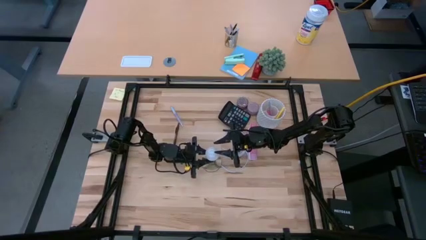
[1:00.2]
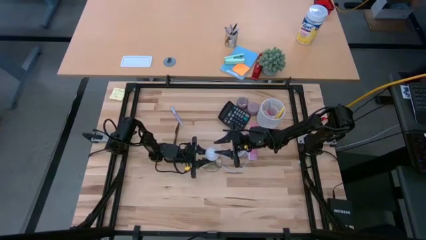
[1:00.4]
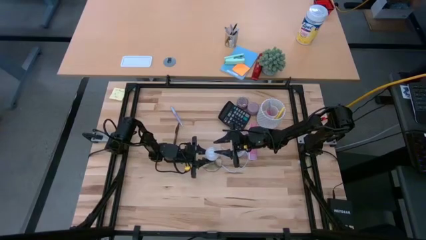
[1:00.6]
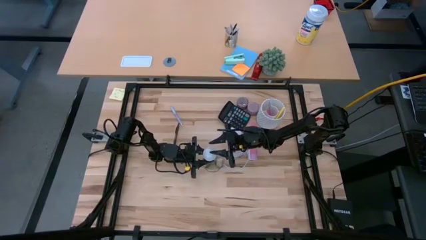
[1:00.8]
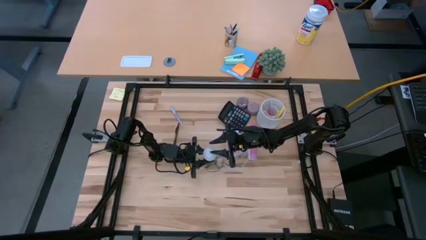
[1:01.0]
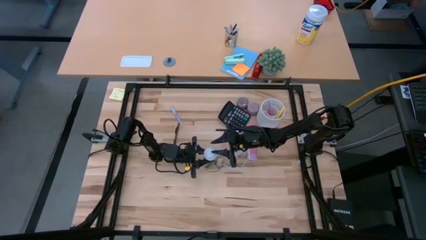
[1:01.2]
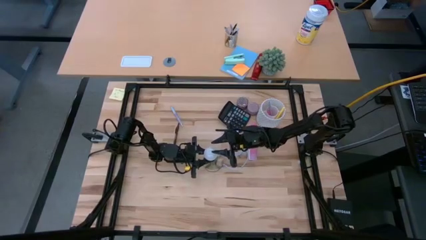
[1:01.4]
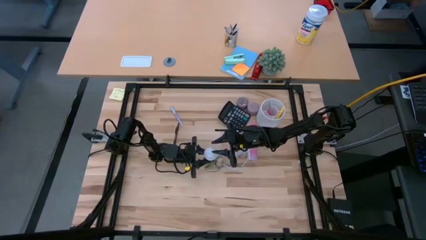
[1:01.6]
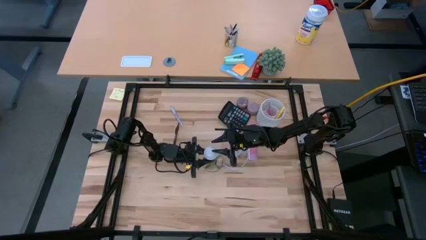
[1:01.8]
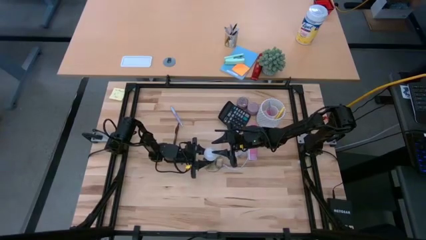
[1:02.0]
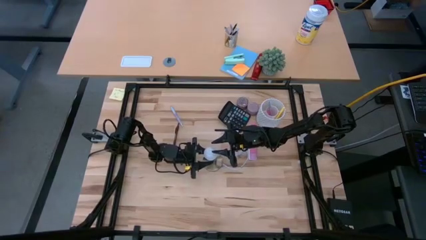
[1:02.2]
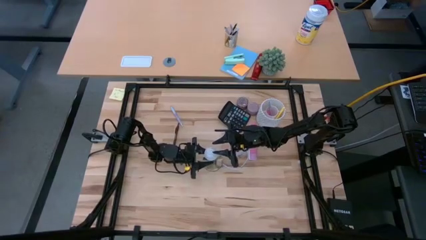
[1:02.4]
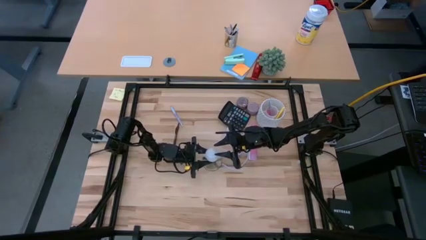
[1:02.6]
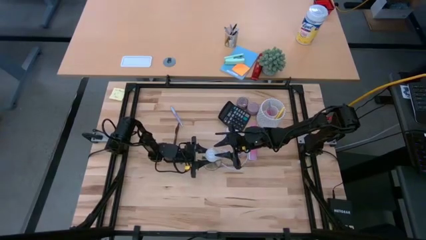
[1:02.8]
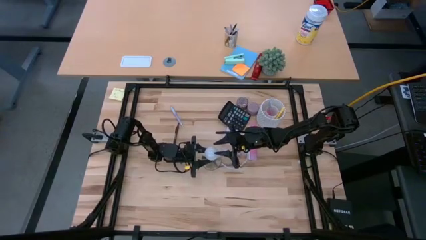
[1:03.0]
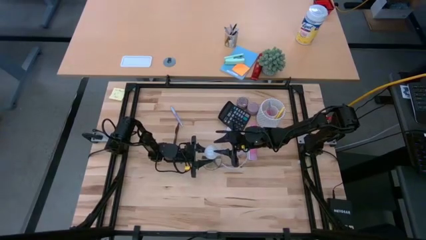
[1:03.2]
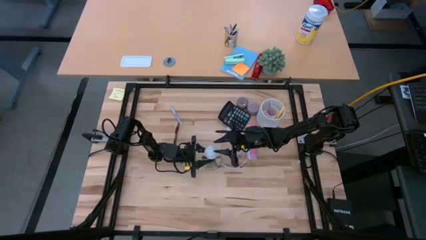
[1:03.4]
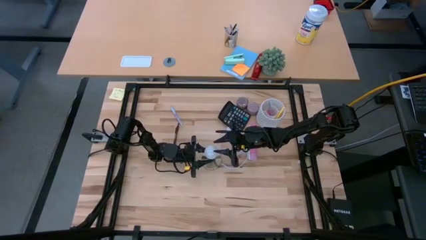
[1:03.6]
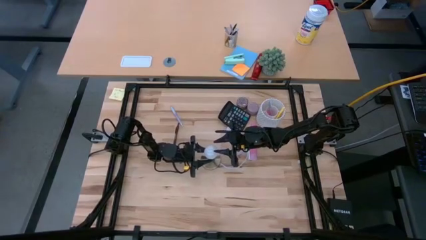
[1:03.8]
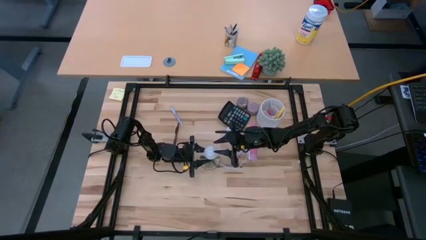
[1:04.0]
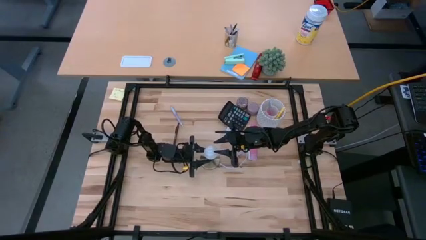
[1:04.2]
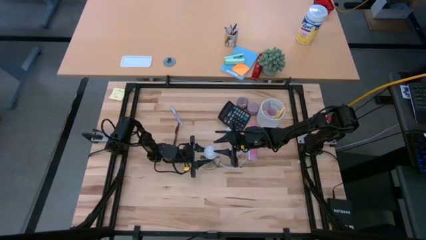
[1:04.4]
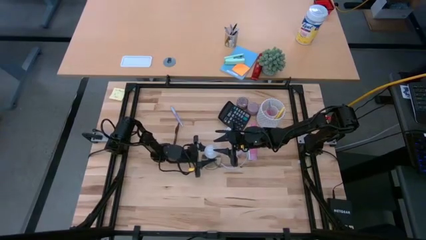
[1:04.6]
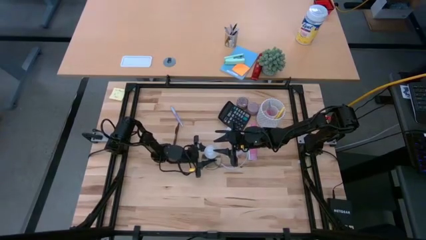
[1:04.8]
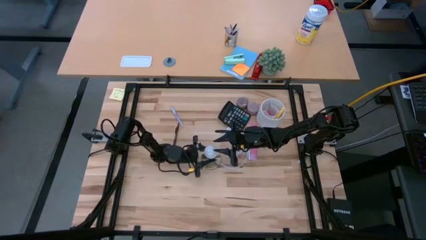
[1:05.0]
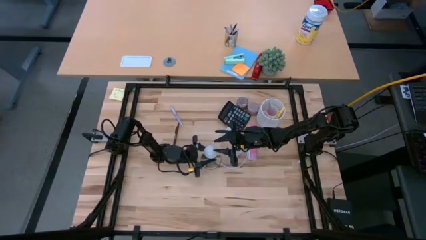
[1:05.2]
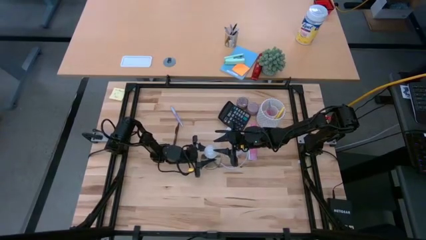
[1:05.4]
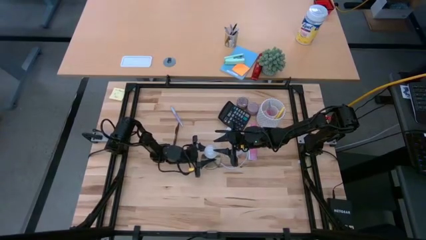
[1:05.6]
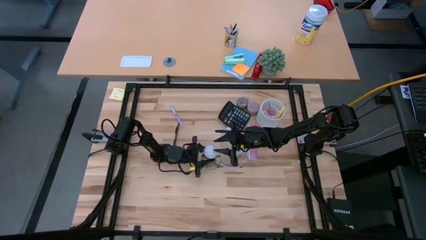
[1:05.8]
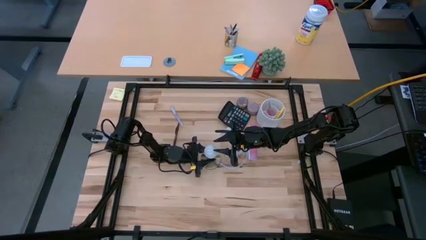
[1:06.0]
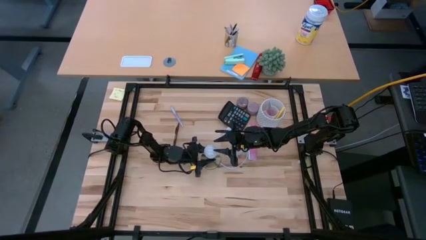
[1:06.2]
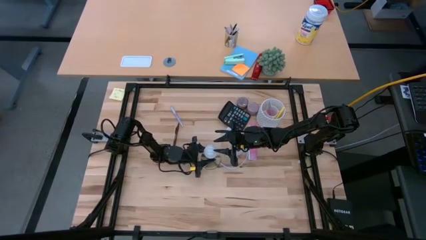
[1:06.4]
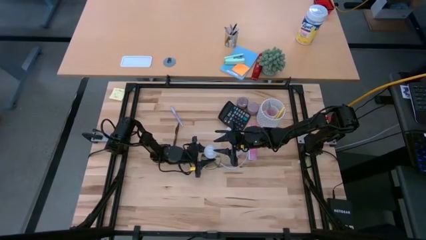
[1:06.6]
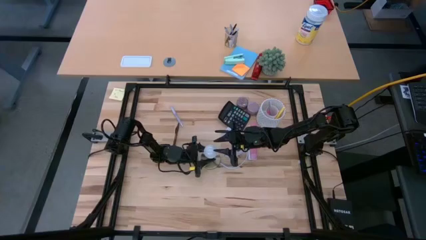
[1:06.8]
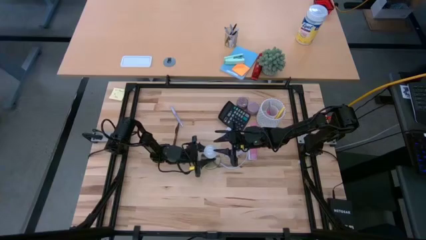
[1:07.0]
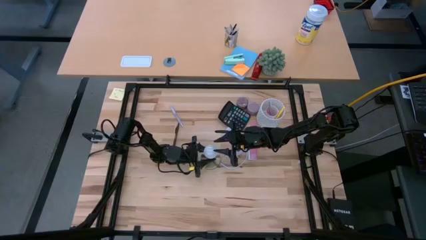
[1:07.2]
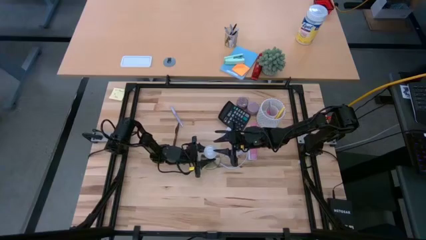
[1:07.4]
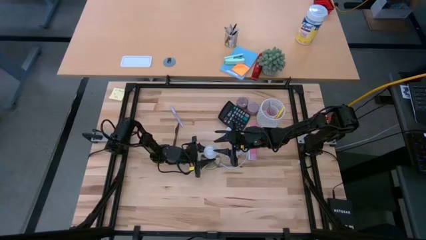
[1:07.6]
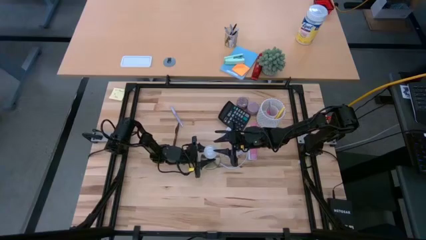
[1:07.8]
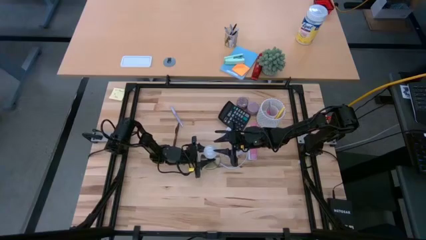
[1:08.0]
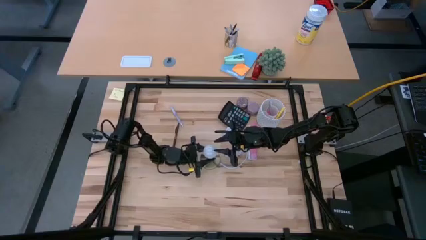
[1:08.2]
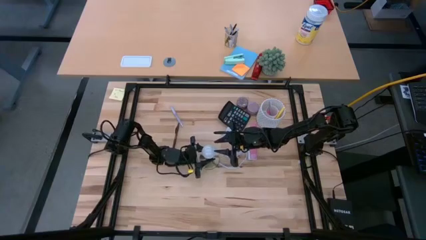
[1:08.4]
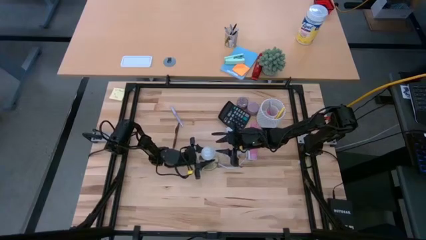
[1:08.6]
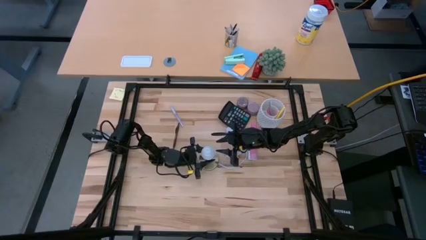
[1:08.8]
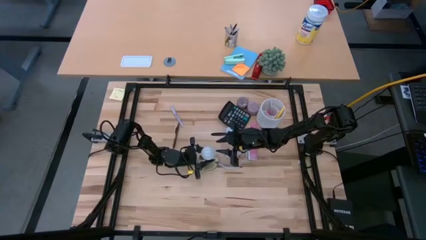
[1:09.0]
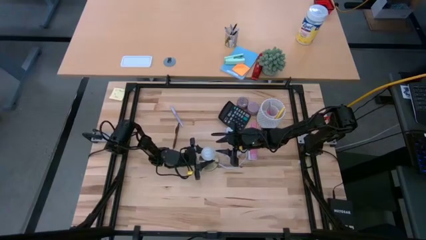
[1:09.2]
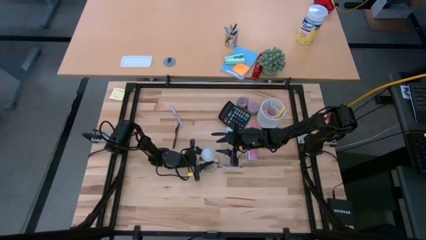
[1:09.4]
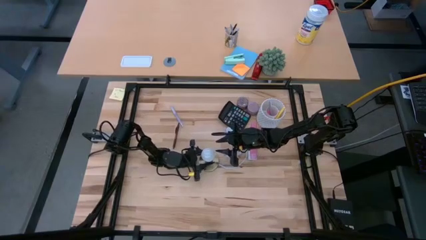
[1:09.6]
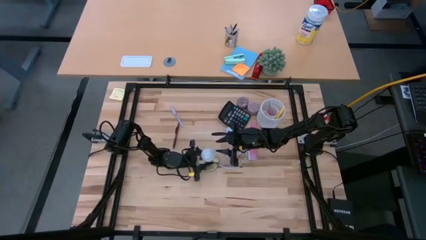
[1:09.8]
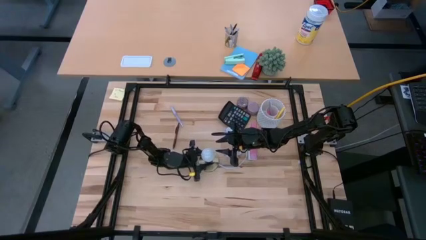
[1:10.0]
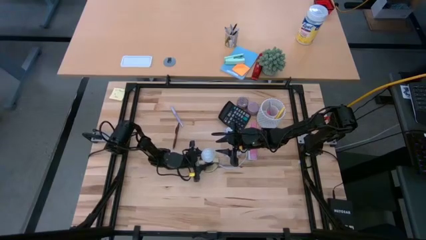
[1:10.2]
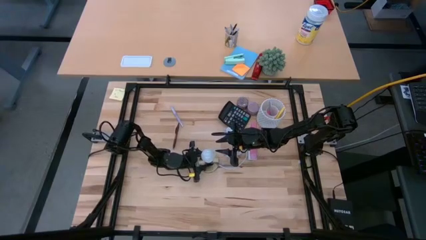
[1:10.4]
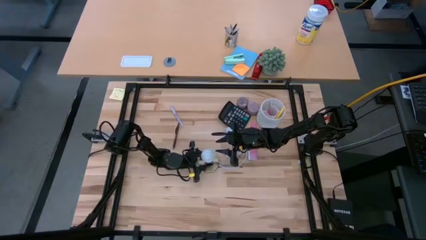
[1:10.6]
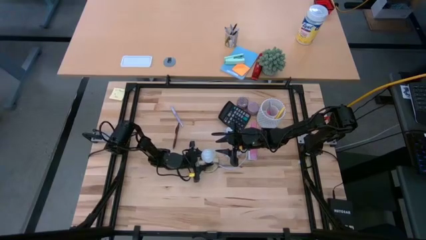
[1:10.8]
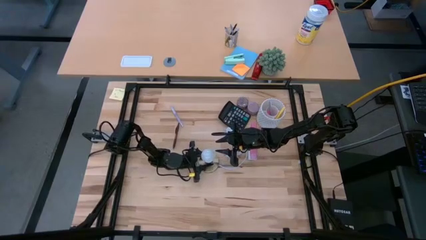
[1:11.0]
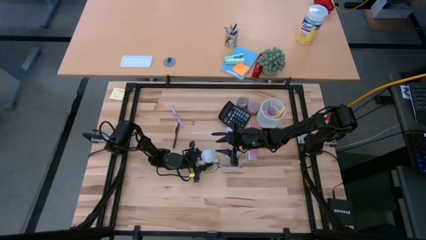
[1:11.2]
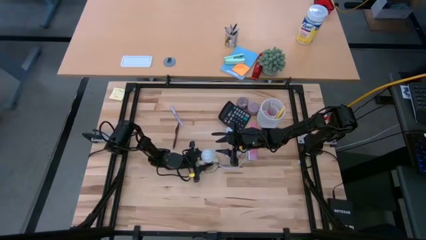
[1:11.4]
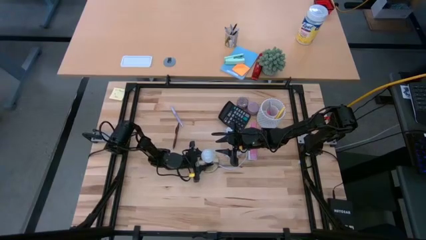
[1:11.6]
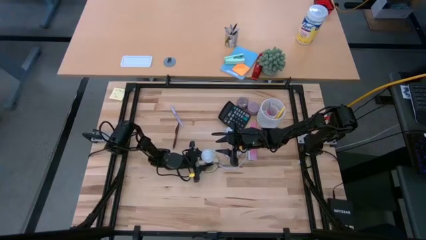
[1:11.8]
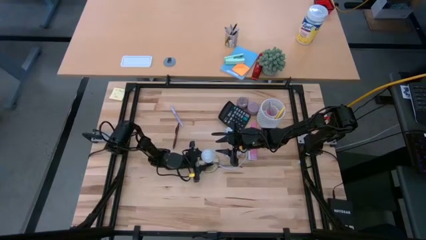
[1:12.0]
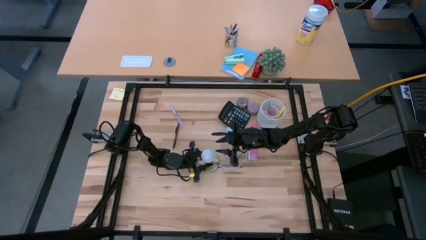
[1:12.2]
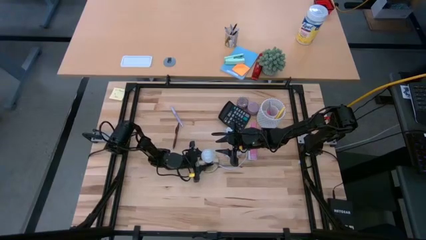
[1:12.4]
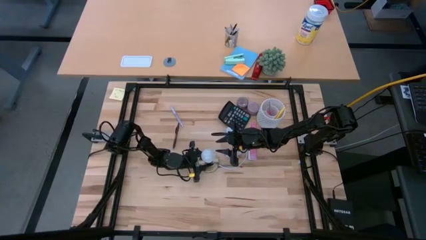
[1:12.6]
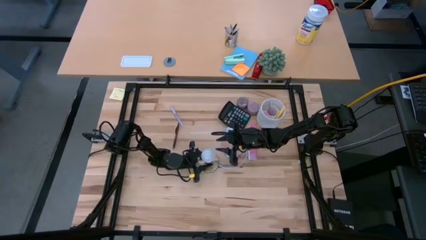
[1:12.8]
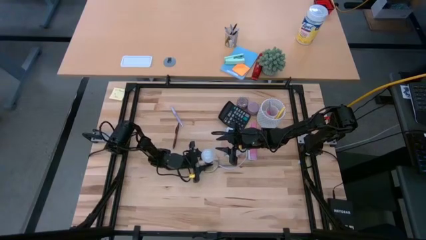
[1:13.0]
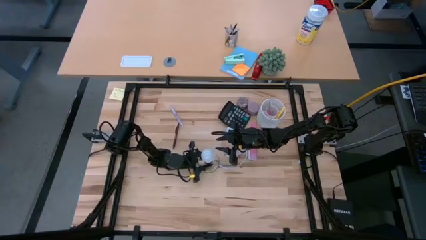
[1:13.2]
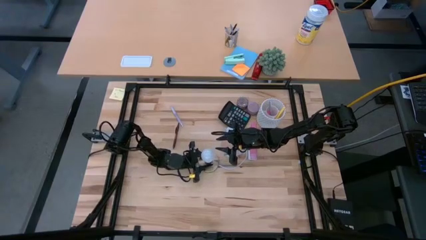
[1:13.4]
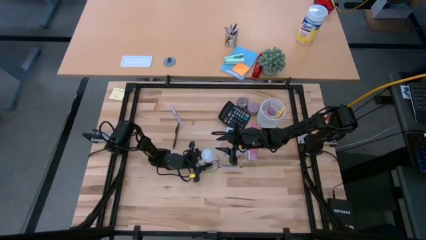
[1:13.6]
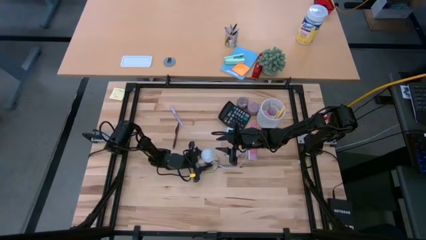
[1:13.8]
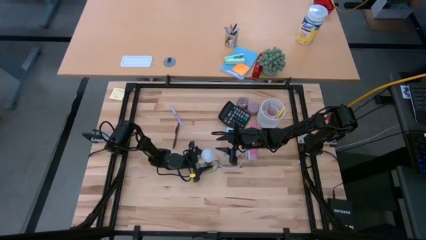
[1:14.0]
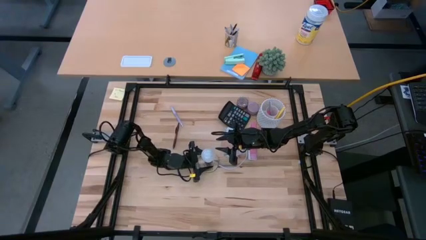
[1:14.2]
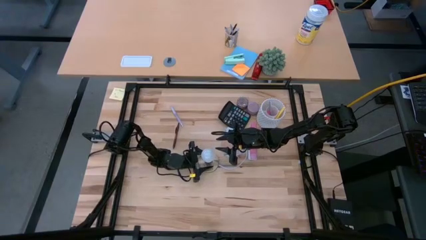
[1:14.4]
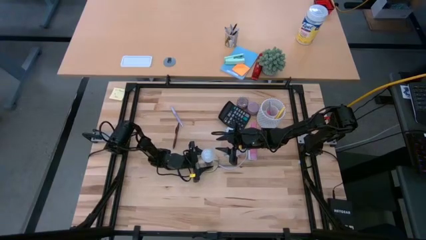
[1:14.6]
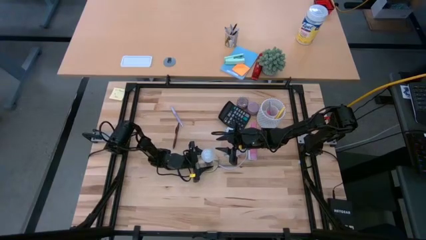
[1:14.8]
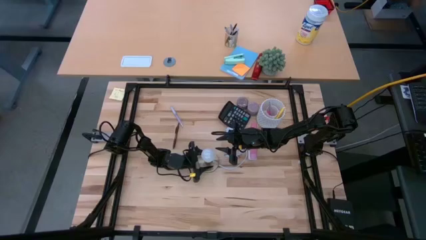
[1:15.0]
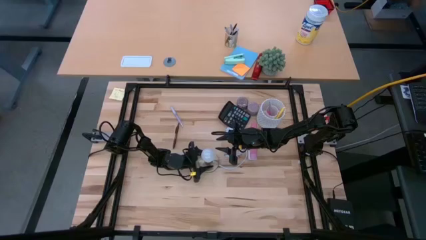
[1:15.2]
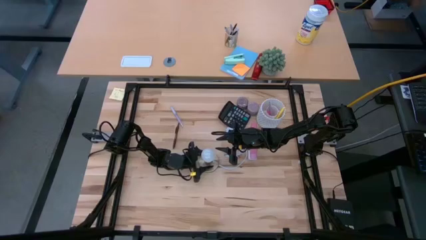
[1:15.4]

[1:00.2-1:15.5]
Task: Screw lightbulb
Insert the lightbulb into the gold lamp
